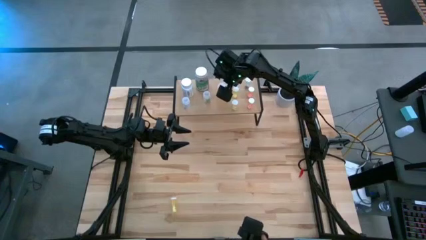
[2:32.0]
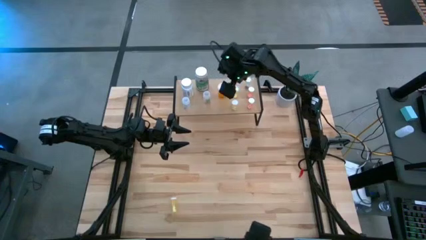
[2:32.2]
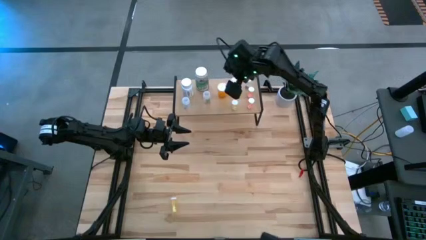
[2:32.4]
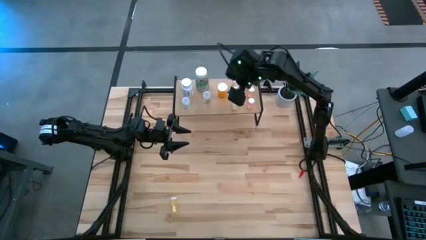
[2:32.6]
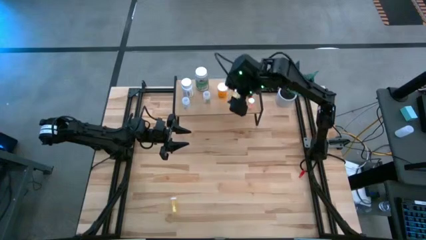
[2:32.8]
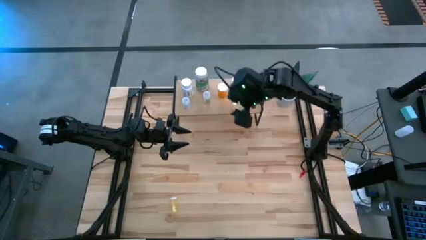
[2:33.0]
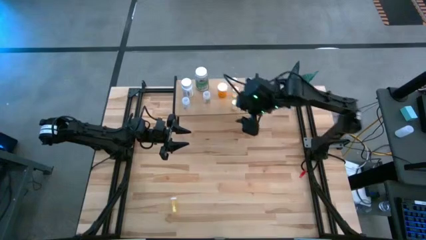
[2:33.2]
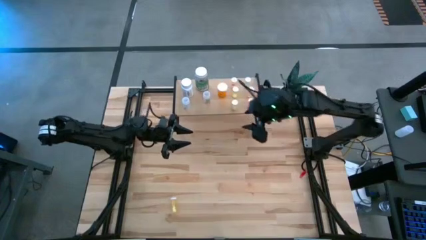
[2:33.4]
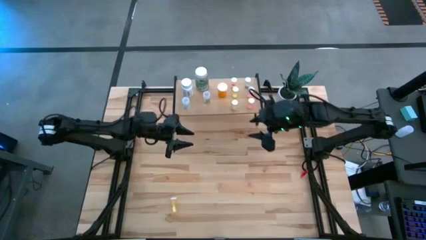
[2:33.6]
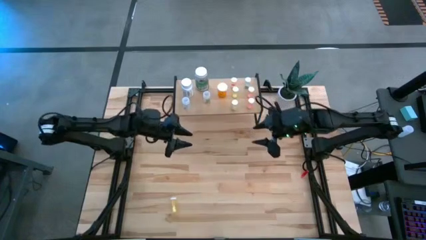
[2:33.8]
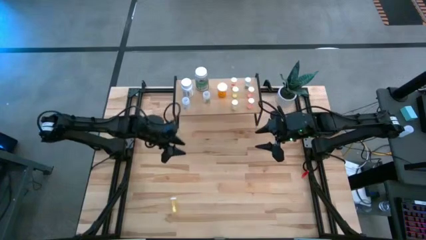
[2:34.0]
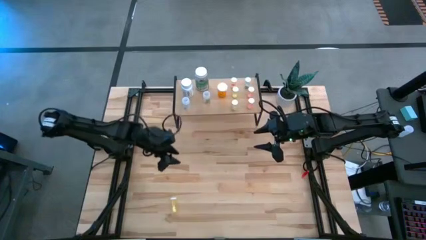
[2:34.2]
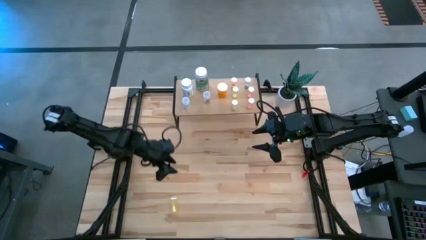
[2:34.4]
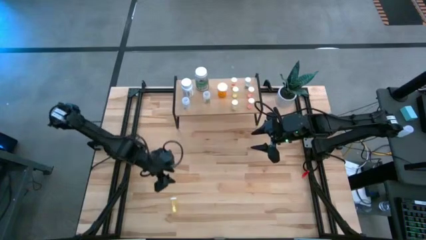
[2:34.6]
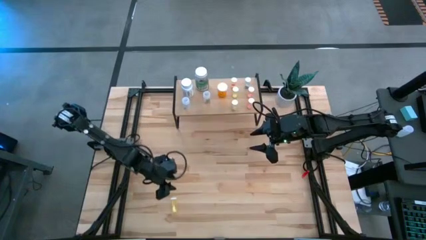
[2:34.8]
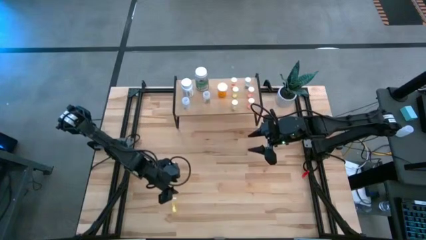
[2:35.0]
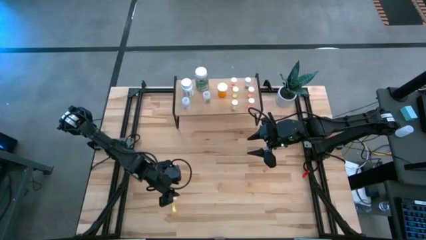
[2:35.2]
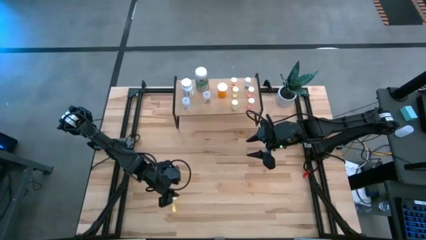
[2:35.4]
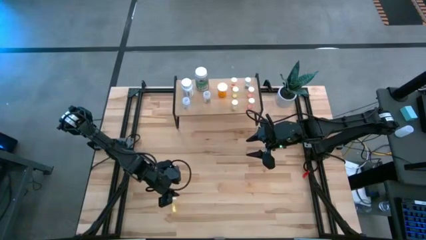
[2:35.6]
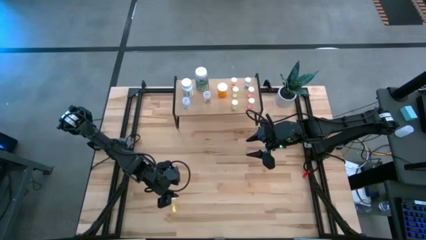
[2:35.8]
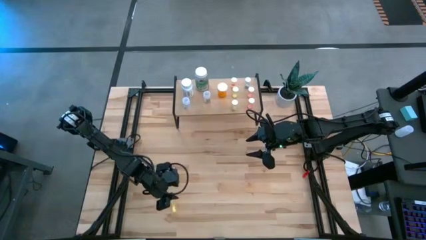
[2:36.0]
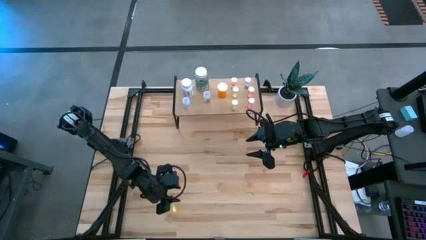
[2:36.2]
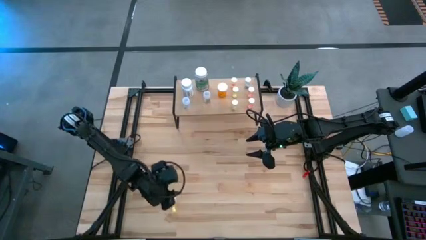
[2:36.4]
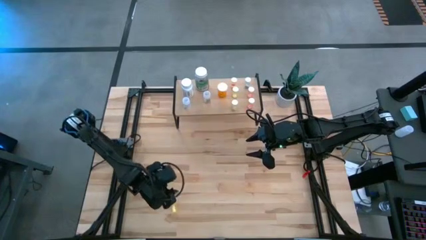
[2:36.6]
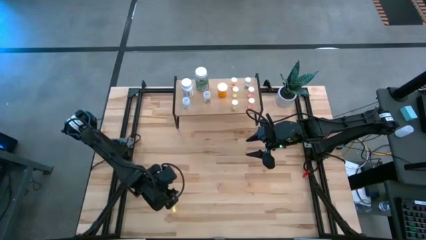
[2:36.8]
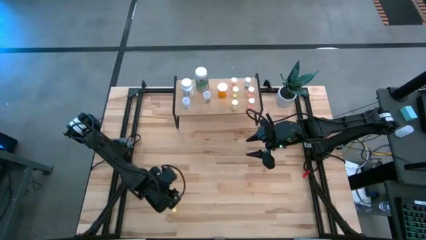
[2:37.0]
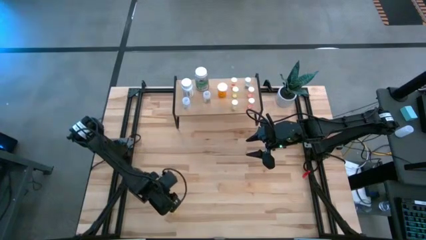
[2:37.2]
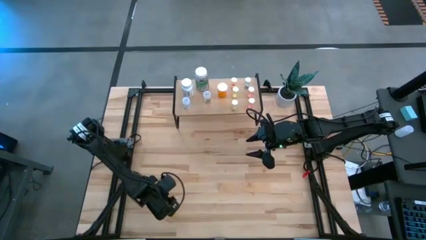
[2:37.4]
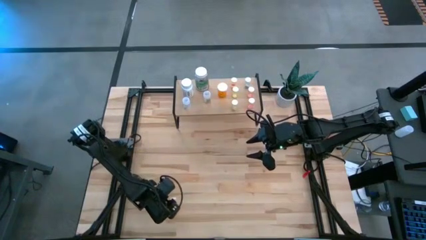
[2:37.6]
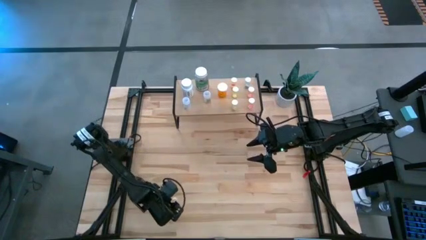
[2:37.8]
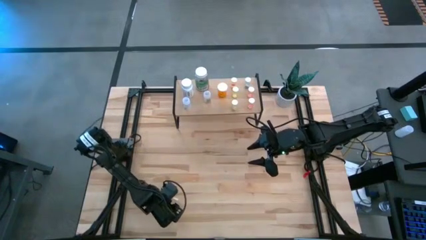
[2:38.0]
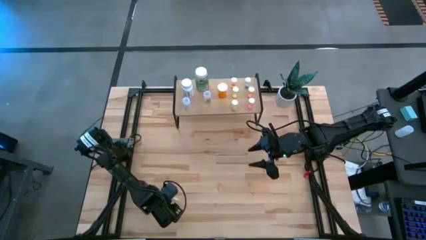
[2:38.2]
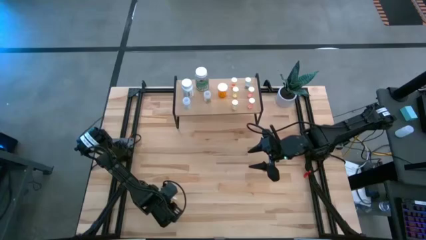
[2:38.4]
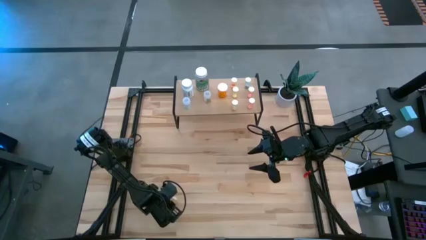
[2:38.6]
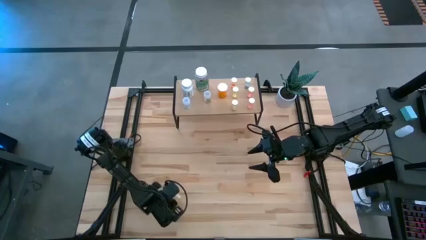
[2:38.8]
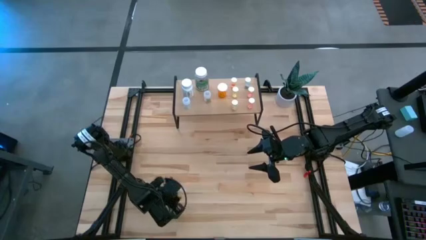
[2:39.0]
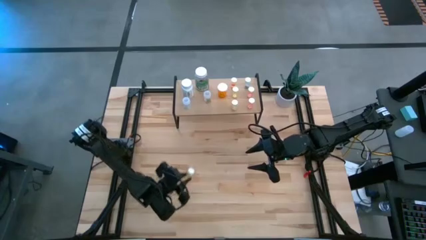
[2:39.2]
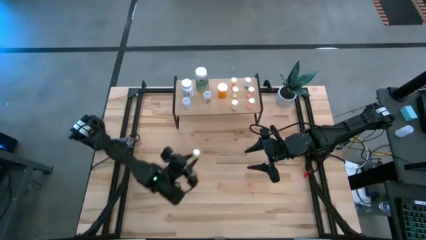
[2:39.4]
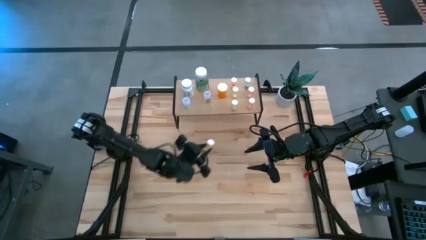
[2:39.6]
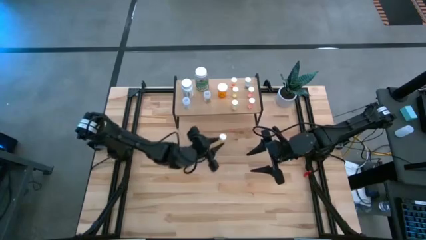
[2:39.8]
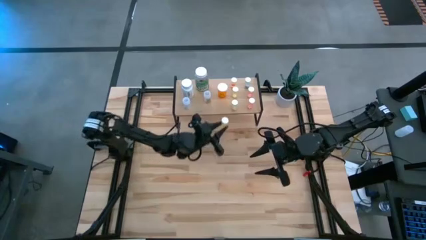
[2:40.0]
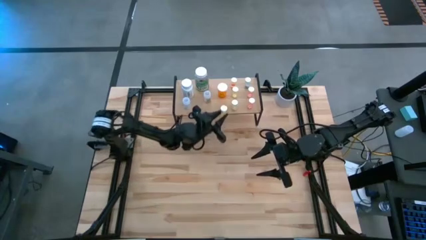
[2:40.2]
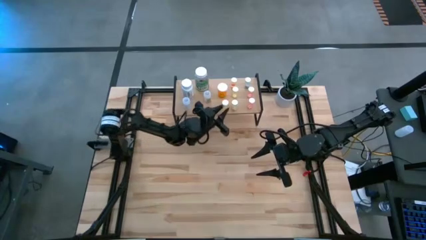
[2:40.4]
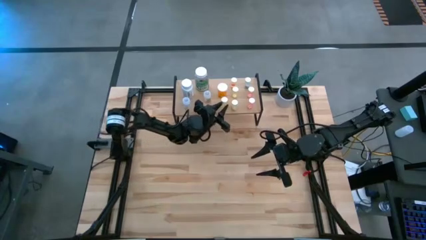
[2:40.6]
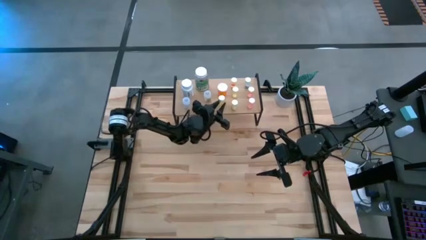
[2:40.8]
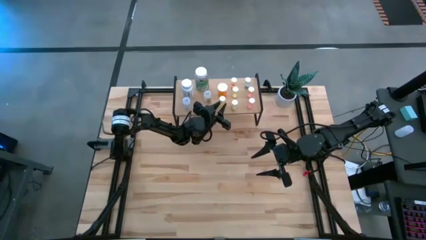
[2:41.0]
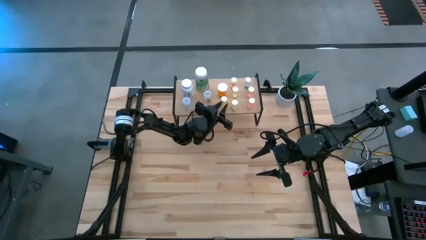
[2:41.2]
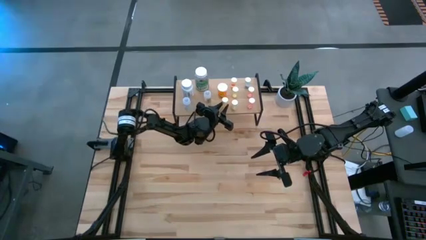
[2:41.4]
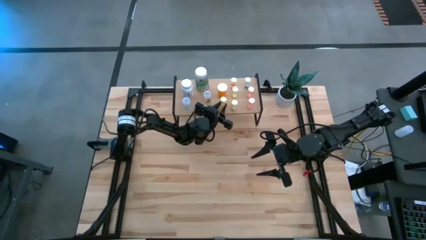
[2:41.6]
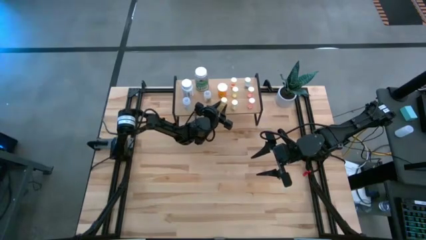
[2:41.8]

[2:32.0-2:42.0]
Task: Pick and place medicine bottles onto shelf by color
Put the yellow pill bottle on the shelf

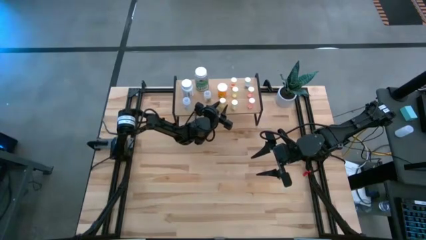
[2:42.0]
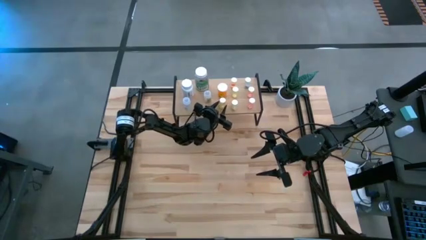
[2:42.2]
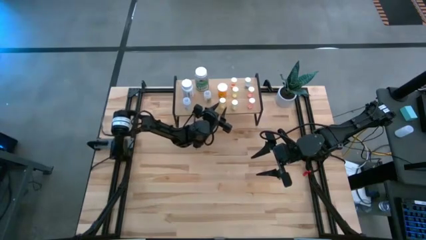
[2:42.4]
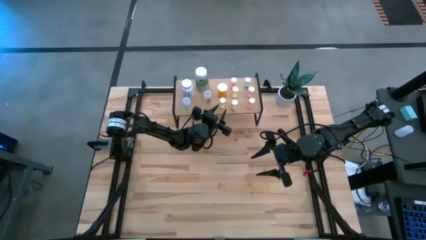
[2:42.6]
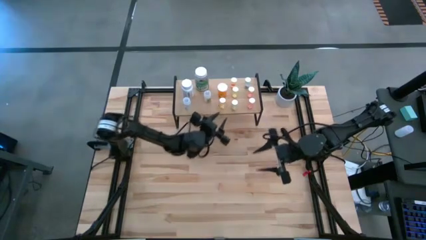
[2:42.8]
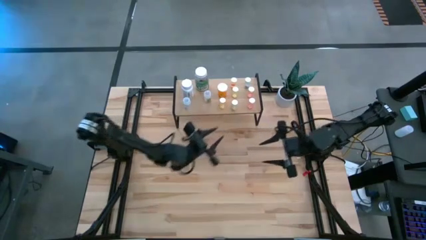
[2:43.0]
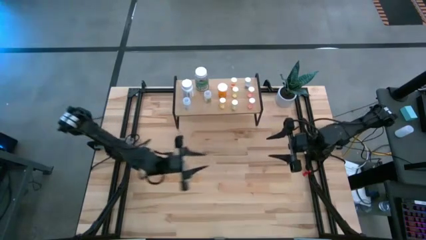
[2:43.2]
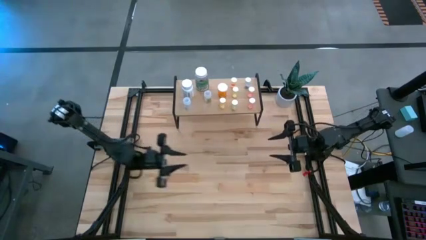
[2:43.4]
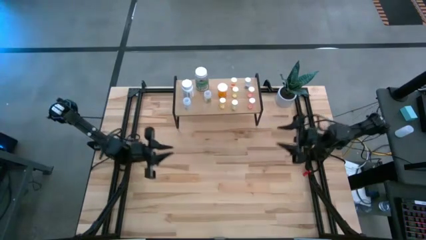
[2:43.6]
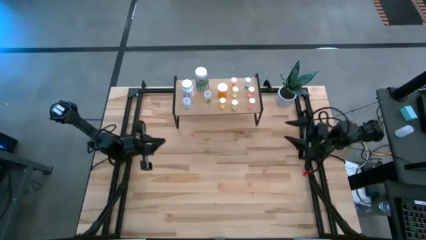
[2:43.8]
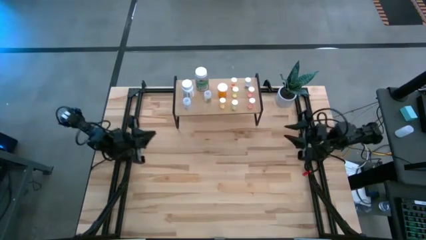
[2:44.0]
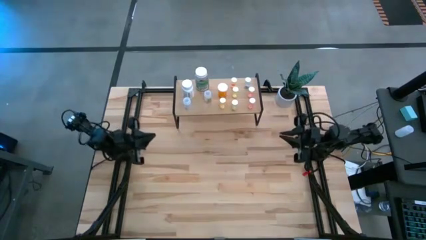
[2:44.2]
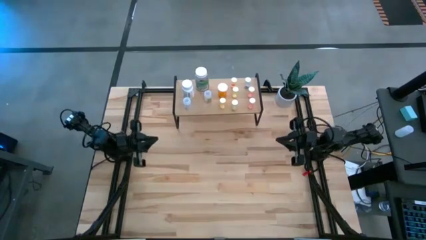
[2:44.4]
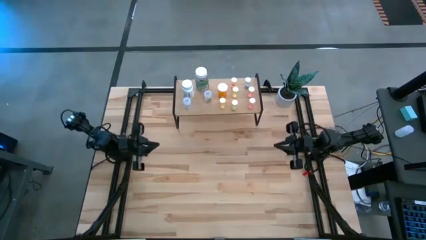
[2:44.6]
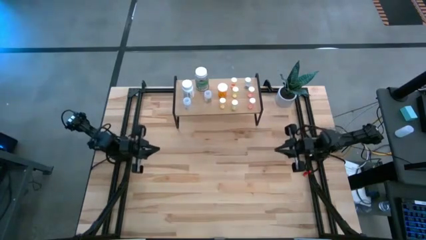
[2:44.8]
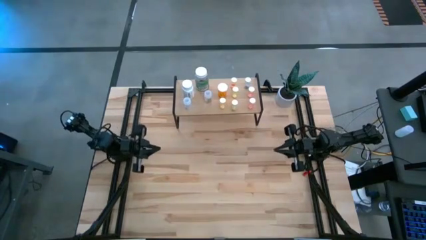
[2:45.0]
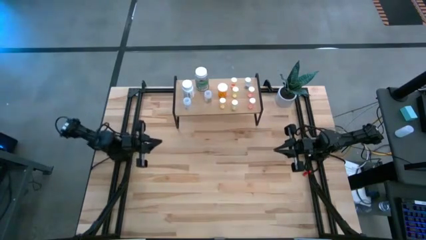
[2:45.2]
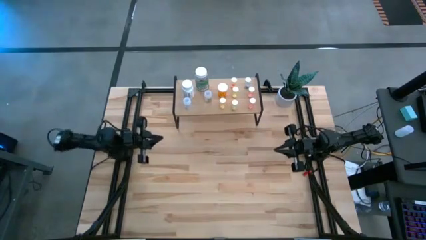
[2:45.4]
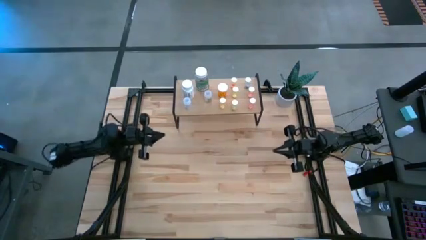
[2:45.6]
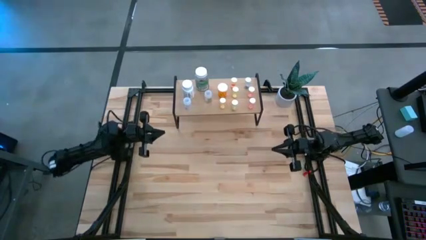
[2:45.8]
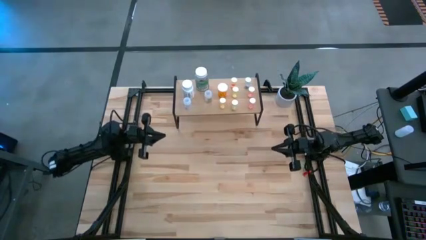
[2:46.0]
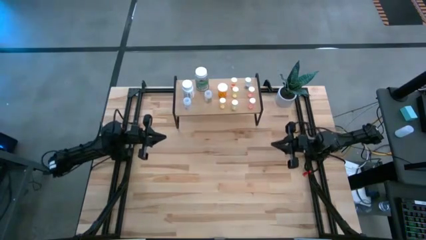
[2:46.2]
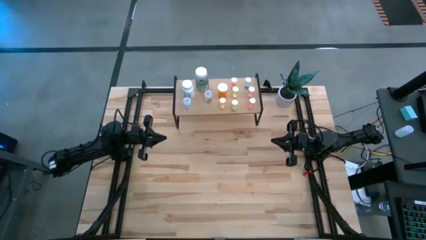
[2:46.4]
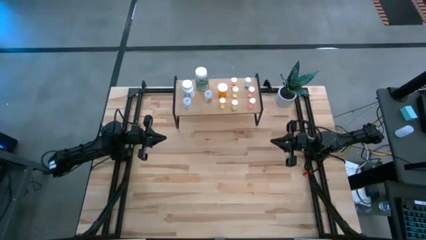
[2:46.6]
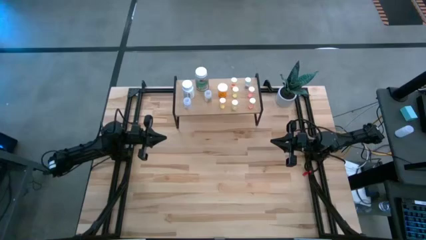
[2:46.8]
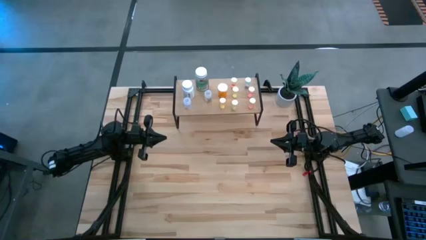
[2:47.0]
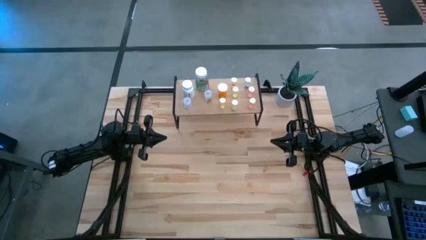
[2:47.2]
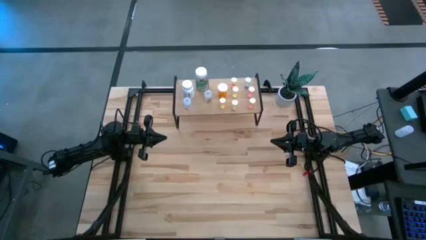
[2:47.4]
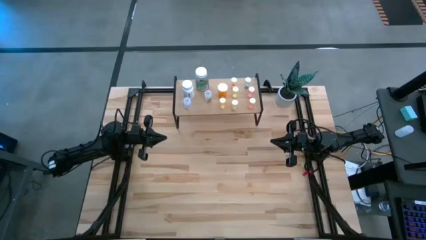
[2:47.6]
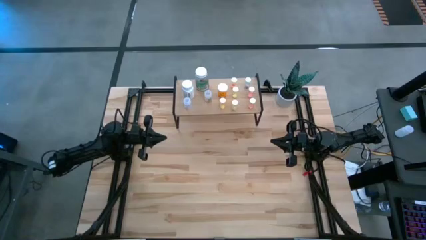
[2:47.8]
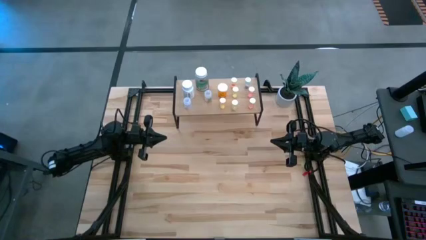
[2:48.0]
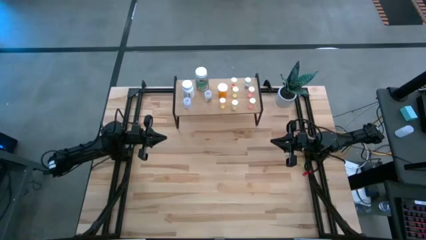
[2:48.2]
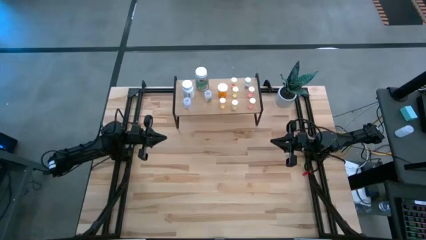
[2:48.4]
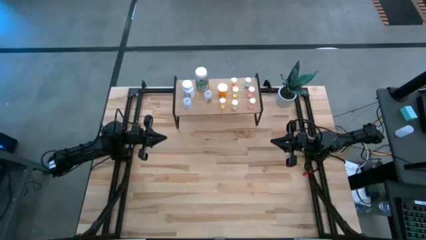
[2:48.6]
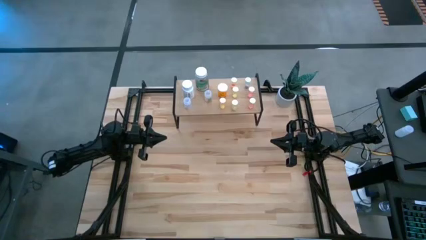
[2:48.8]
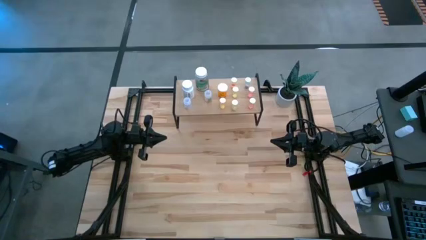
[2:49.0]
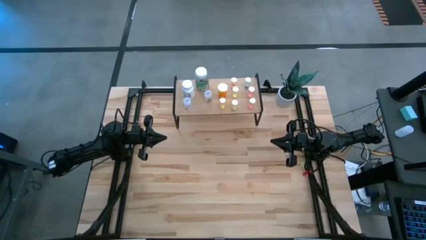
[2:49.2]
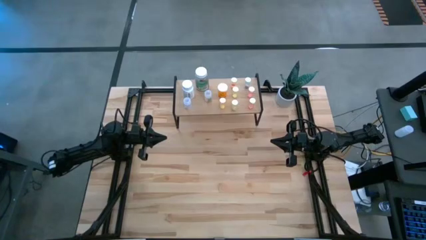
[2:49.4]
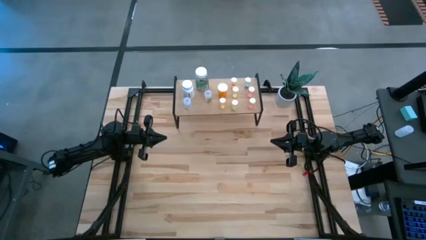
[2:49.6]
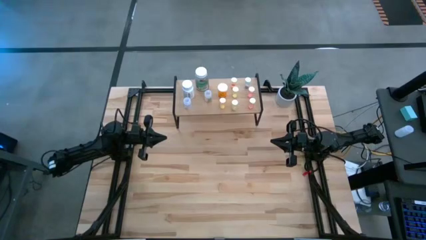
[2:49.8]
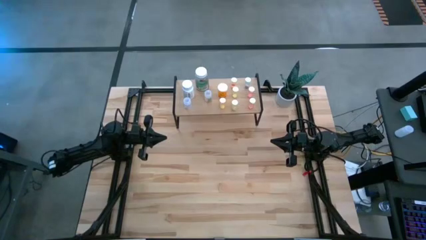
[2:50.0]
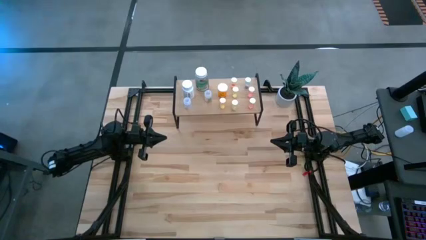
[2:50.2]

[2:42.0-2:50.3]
Return to Home Position
